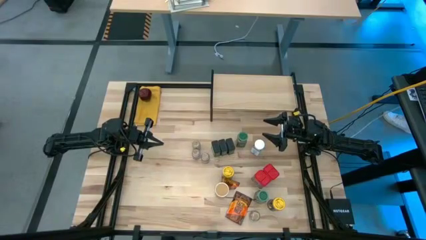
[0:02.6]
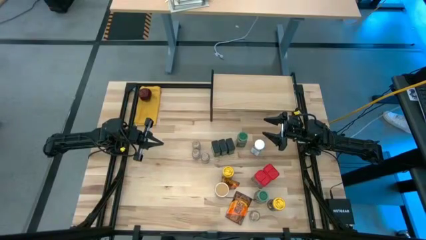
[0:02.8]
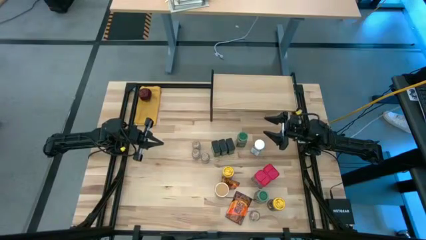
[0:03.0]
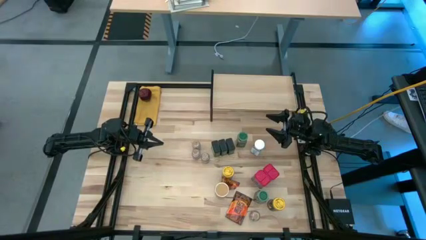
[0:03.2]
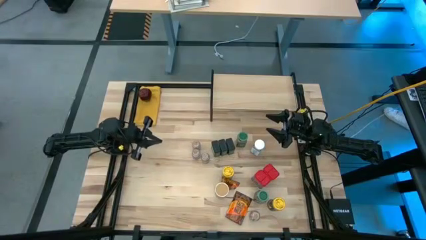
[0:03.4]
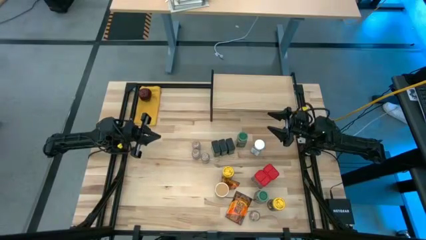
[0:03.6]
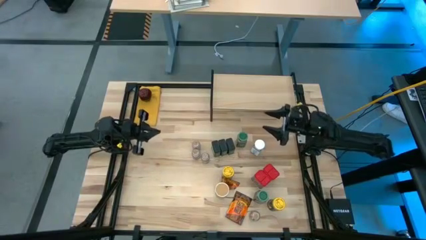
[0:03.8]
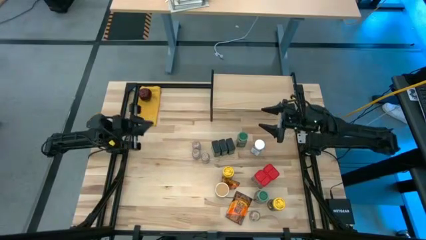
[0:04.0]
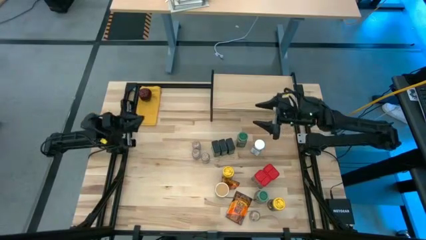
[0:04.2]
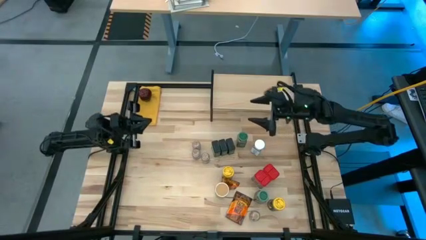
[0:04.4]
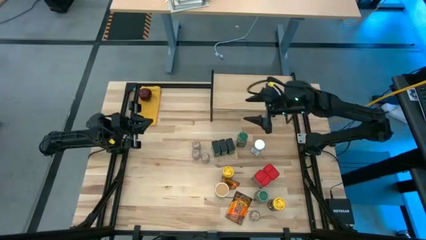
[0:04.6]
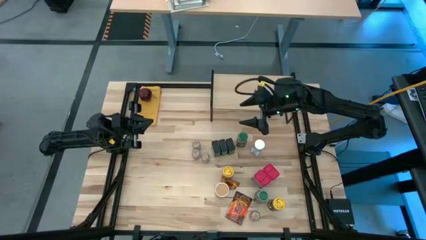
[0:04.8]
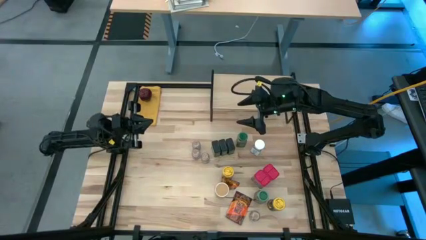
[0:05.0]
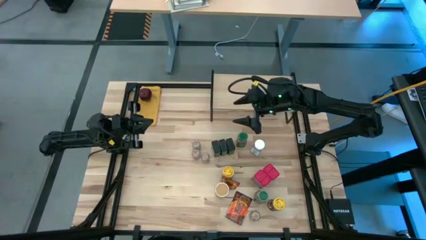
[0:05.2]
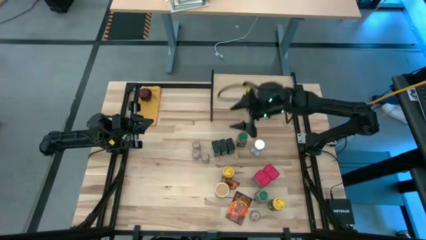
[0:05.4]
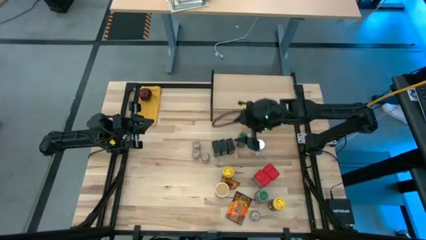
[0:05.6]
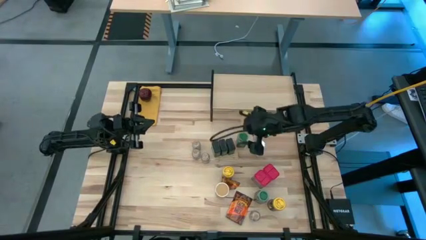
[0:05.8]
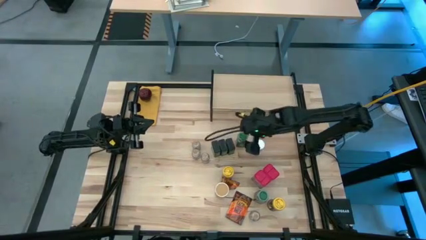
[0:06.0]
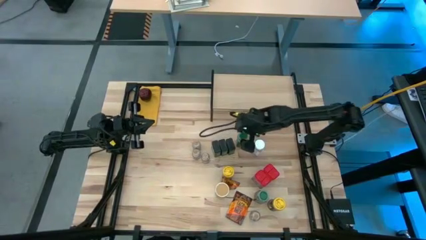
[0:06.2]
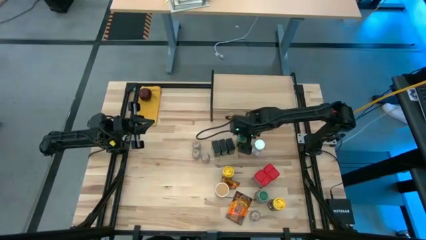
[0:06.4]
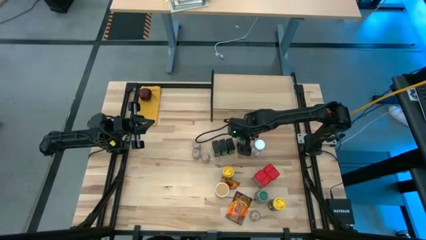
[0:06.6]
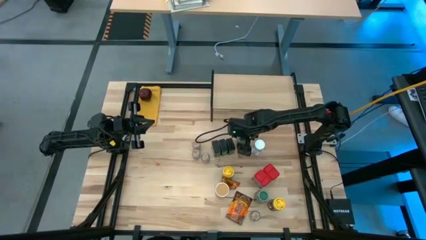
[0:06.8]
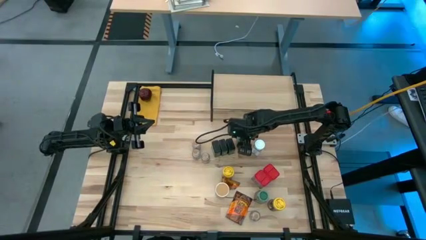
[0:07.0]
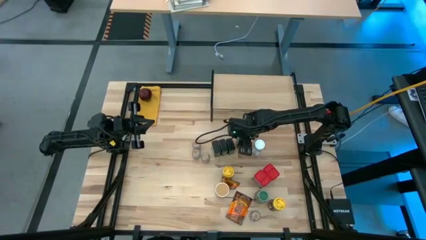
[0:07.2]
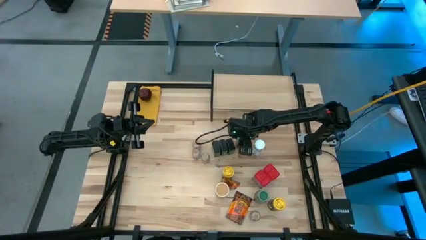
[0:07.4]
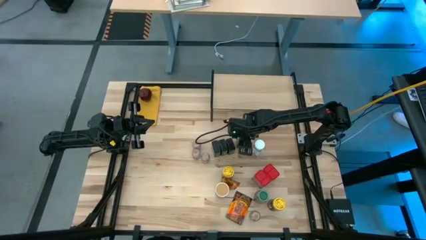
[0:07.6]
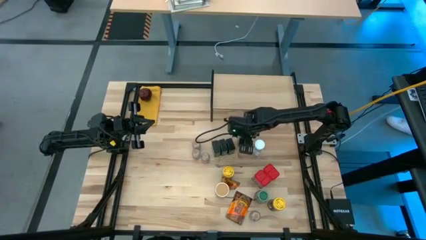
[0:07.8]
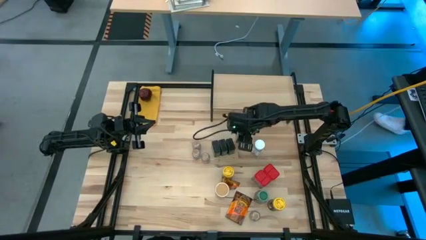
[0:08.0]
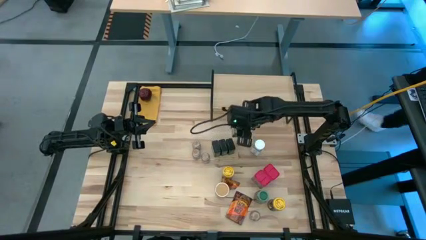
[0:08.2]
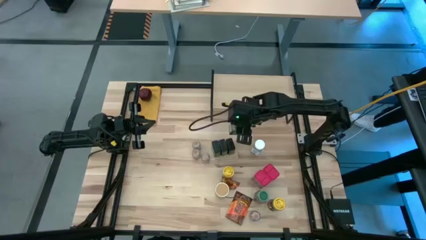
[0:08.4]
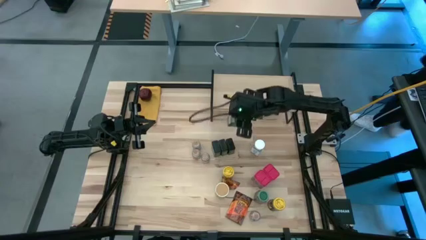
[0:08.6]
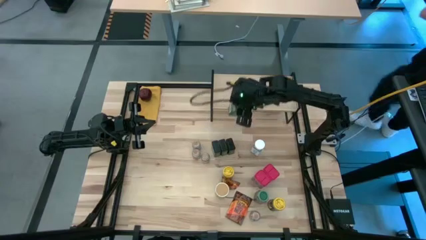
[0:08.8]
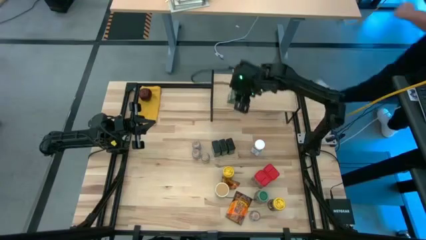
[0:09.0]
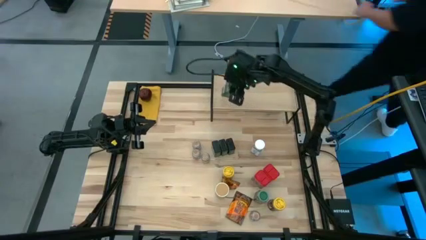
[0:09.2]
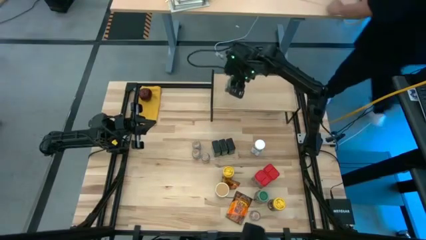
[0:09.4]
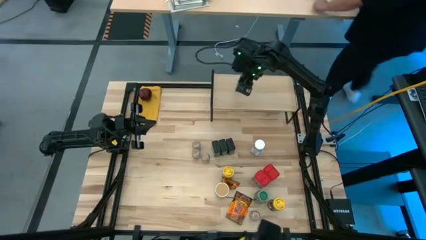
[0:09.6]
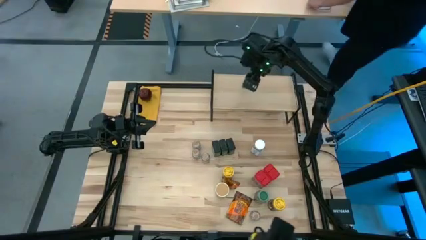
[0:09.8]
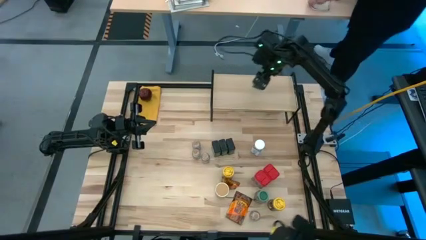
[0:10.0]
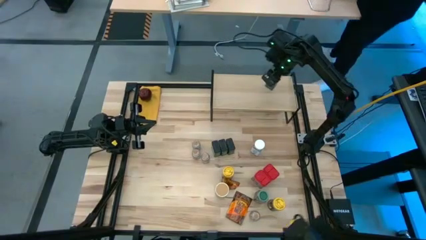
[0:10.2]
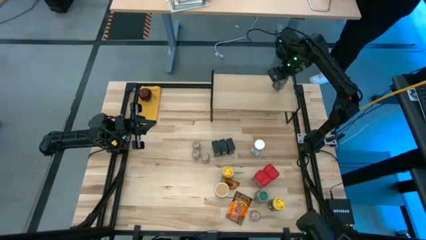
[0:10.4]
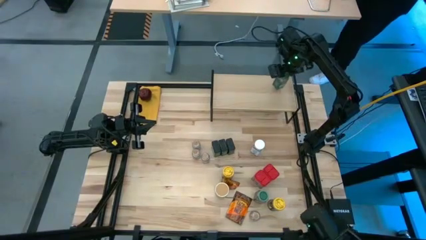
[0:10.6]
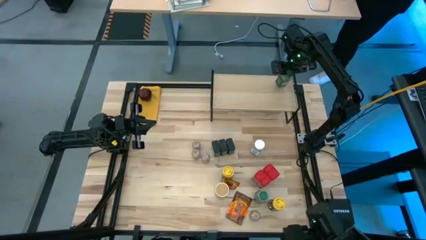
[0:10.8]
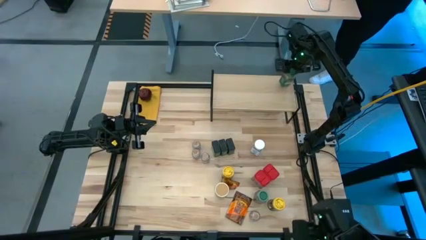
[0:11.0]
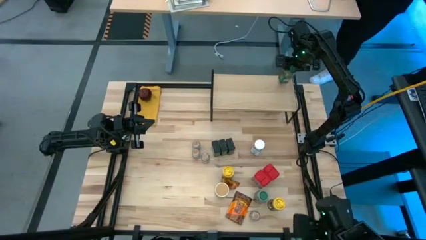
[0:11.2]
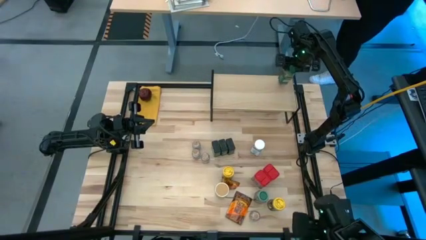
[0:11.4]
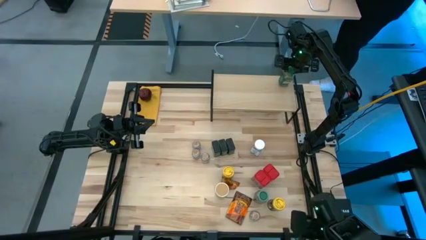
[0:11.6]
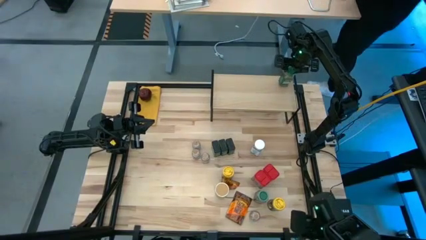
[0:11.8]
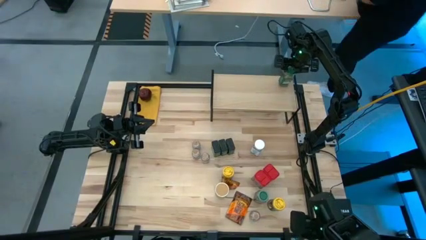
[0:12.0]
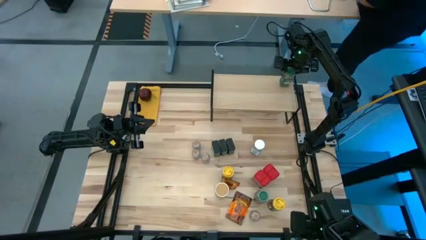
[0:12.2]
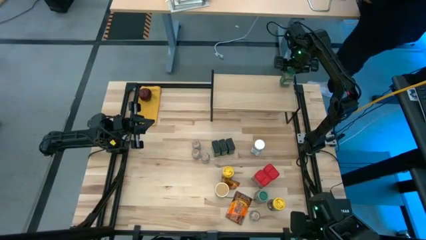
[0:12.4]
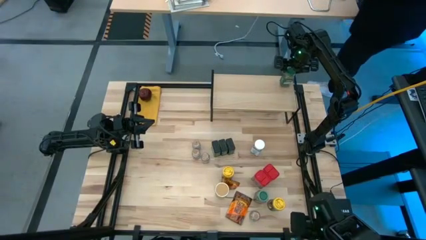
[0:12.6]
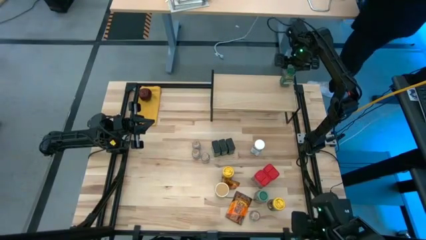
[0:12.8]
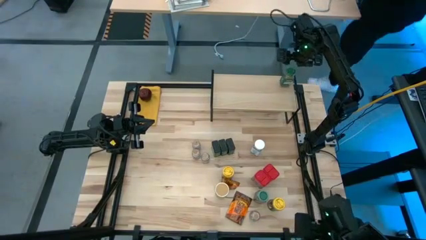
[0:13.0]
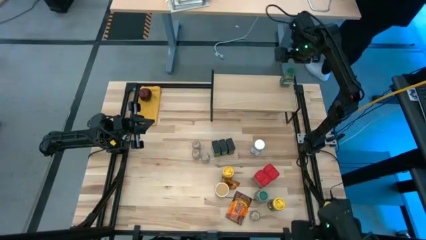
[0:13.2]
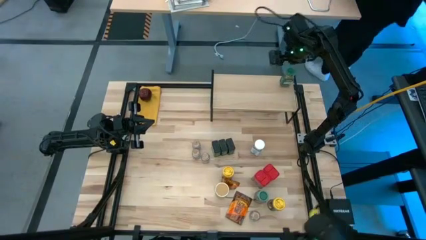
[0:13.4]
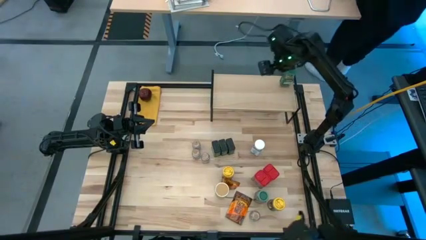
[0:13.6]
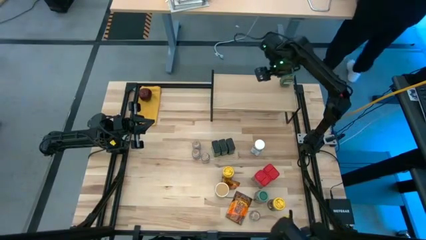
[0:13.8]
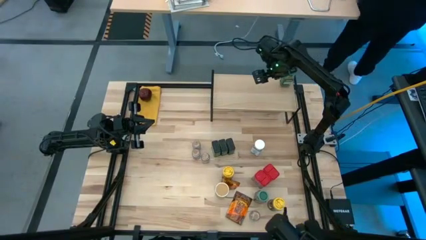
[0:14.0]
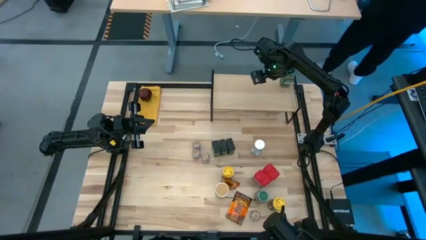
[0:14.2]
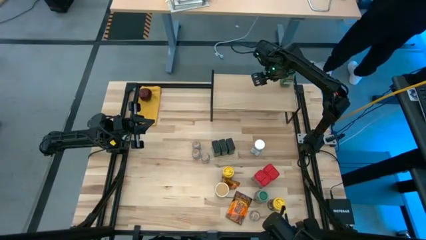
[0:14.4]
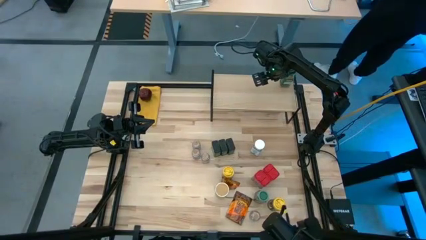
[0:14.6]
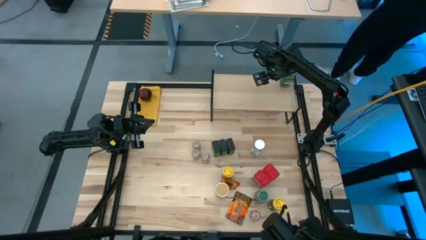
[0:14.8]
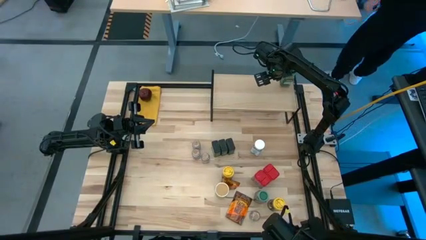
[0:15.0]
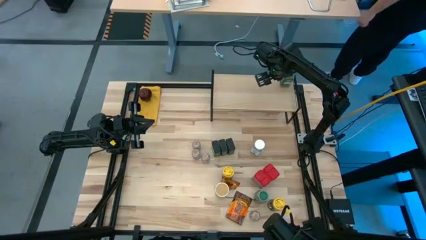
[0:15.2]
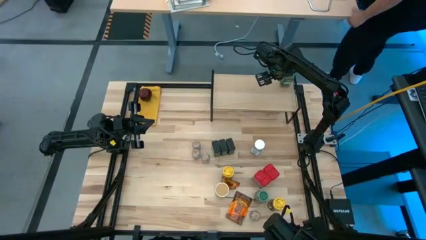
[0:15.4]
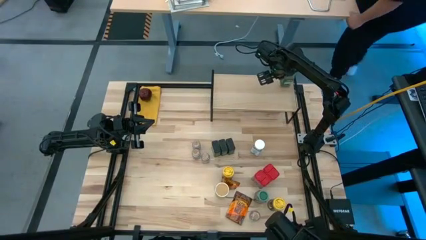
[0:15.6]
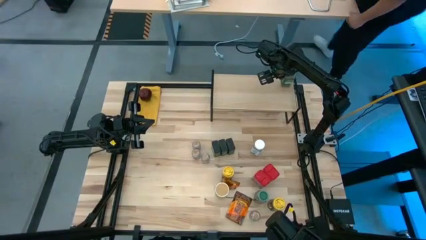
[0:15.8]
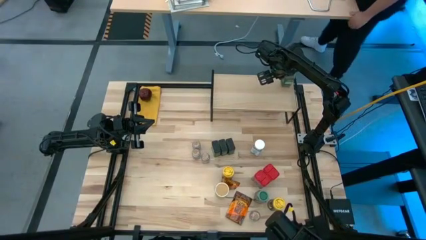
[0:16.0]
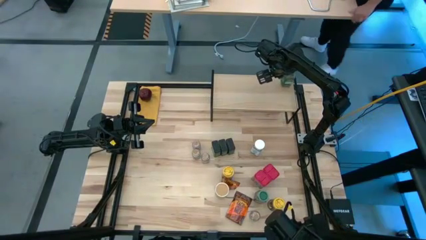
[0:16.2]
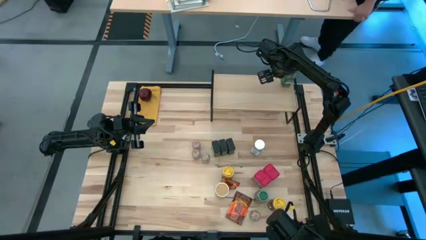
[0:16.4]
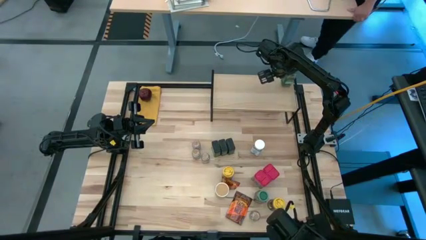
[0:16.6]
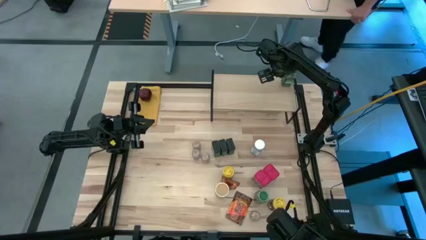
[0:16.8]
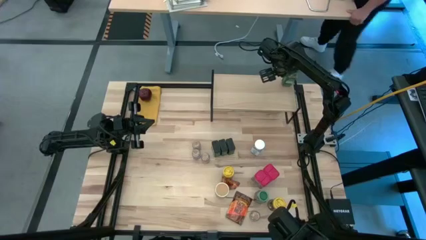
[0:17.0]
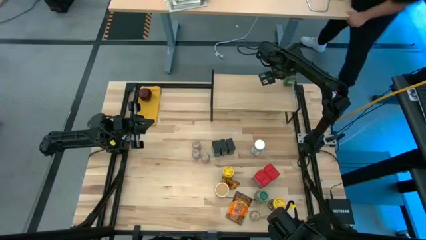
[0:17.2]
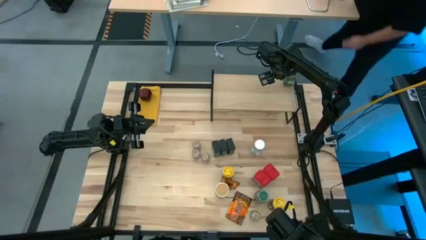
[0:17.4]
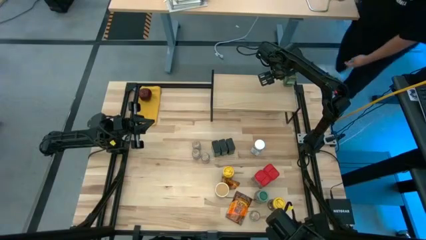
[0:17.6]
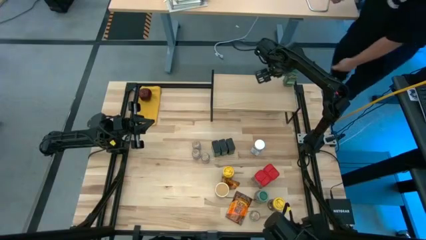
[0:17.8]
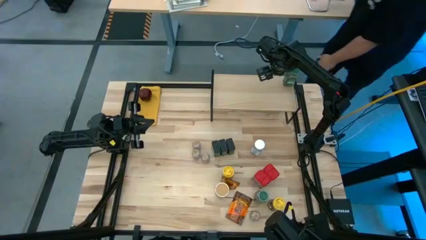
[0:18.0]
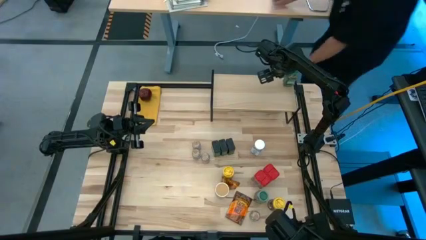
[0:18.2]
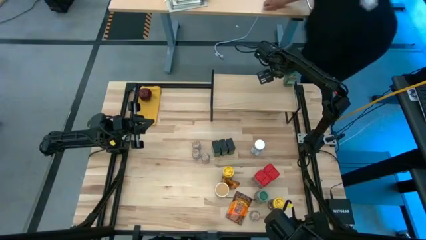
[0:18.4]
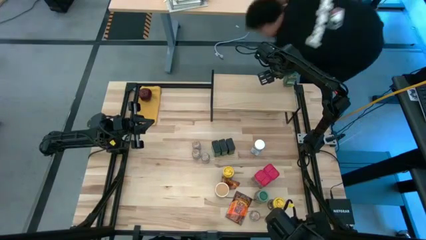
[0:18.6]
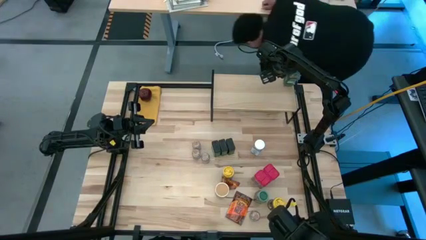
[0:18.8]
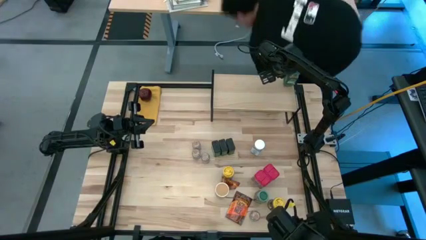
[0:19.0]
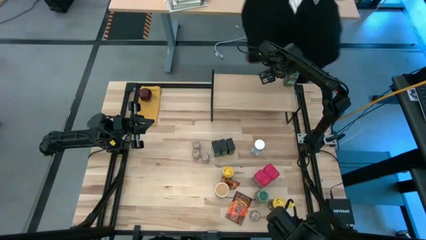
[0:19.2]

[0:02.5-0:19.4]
Task: Shelf spices
Put the top green seasoning bottle on the shelf
